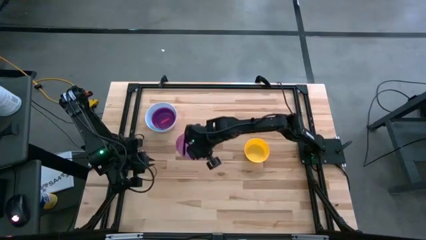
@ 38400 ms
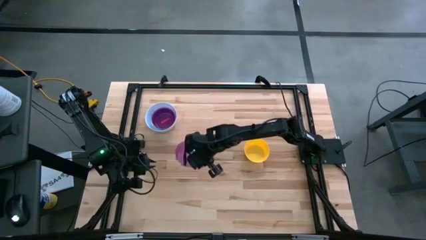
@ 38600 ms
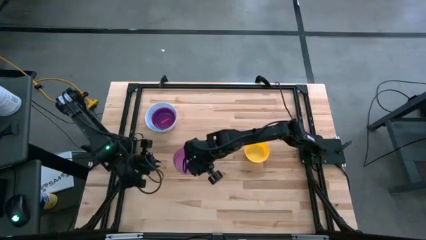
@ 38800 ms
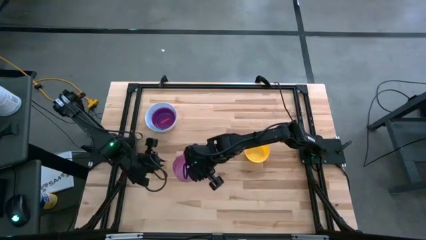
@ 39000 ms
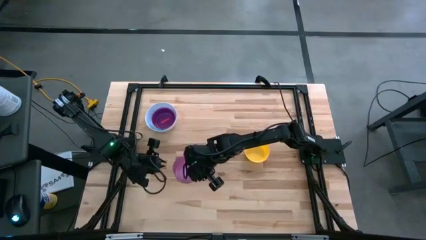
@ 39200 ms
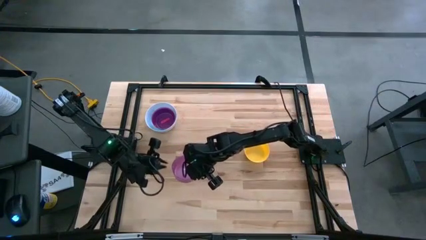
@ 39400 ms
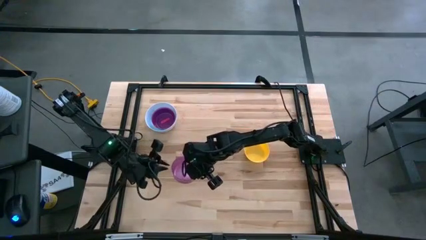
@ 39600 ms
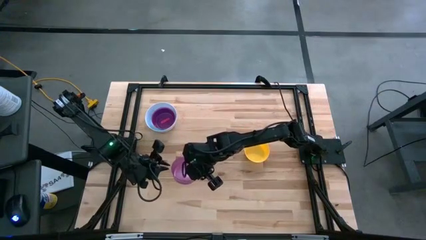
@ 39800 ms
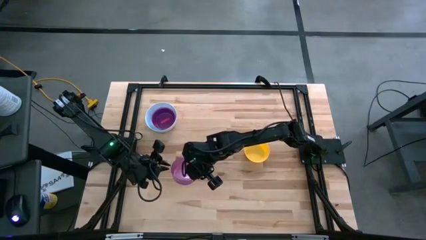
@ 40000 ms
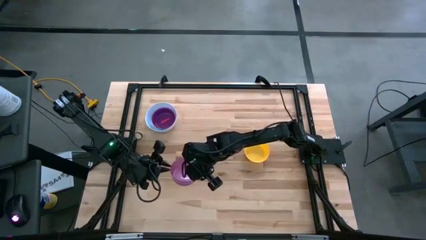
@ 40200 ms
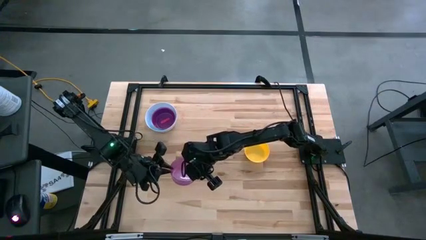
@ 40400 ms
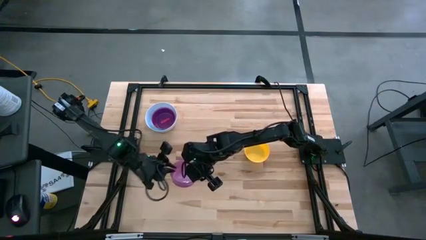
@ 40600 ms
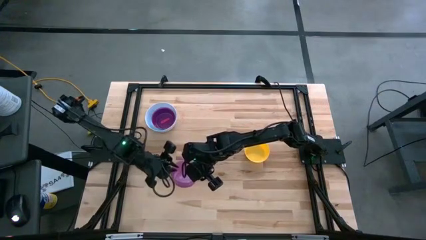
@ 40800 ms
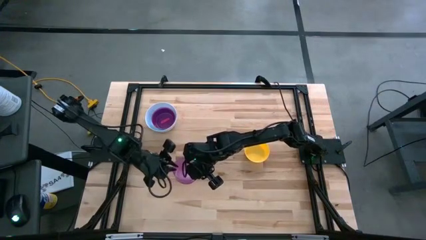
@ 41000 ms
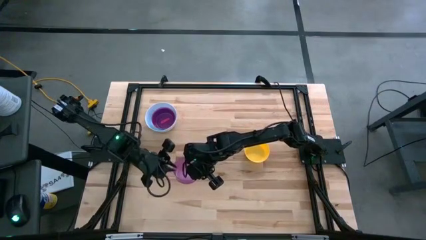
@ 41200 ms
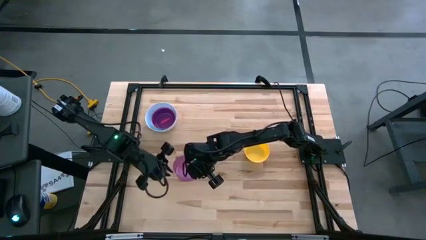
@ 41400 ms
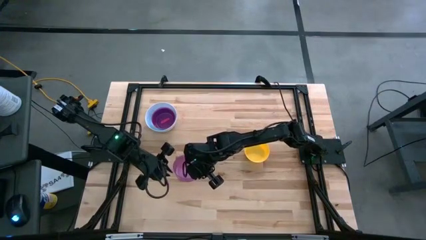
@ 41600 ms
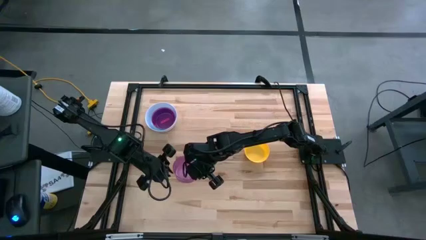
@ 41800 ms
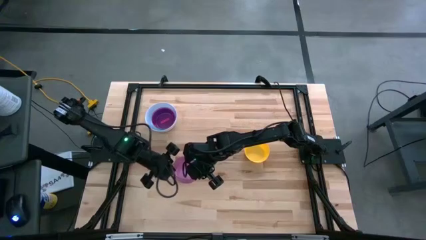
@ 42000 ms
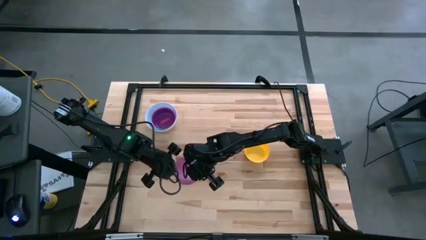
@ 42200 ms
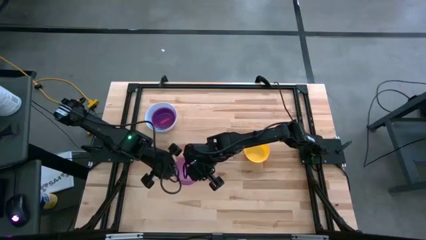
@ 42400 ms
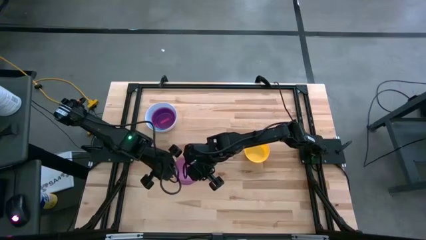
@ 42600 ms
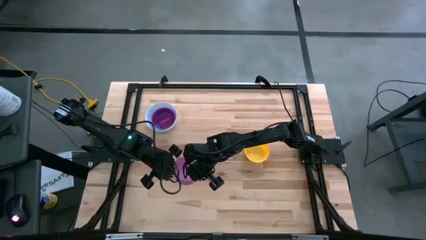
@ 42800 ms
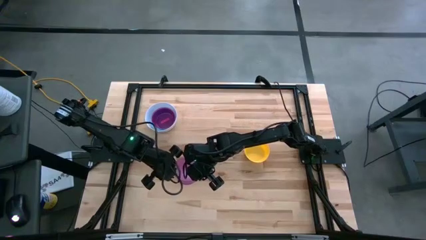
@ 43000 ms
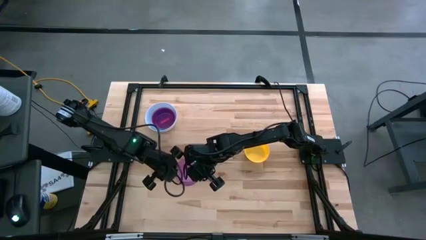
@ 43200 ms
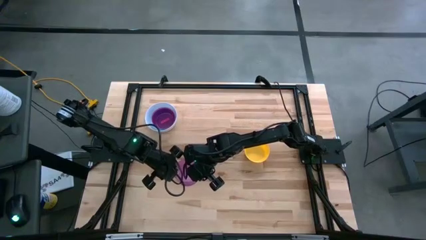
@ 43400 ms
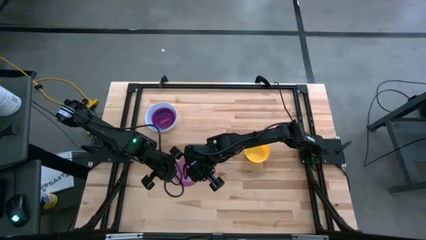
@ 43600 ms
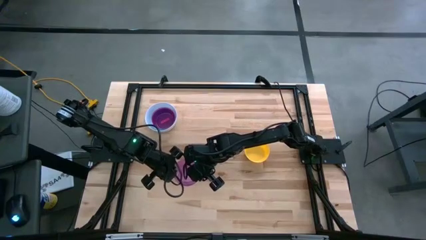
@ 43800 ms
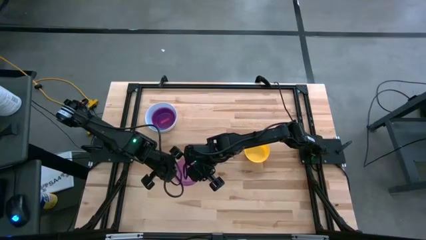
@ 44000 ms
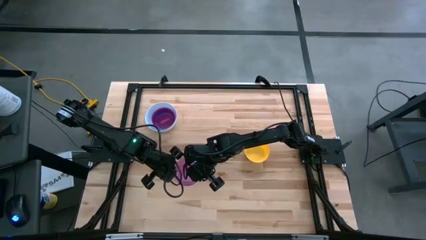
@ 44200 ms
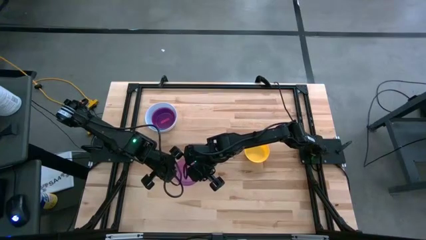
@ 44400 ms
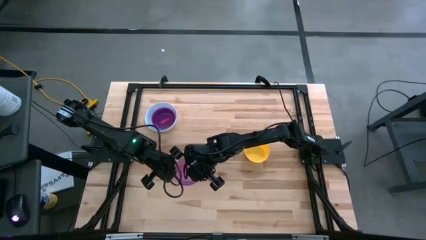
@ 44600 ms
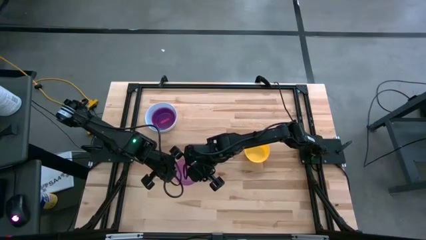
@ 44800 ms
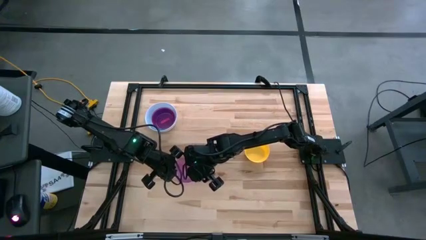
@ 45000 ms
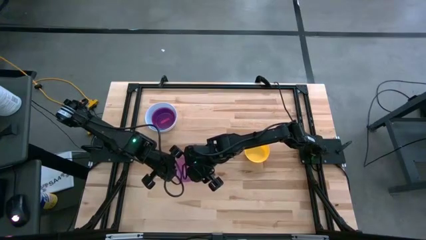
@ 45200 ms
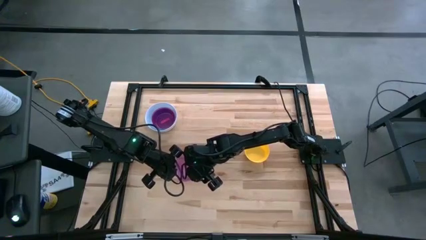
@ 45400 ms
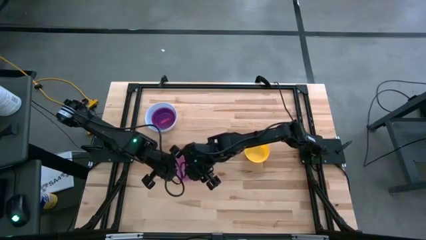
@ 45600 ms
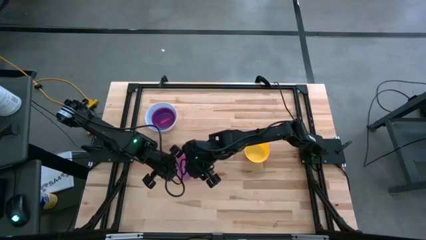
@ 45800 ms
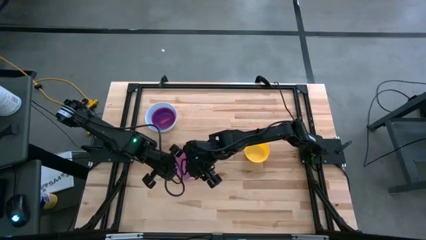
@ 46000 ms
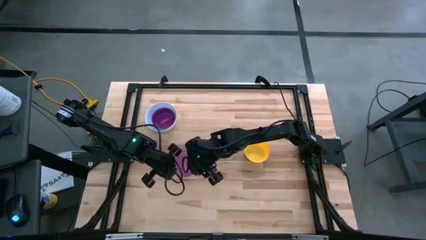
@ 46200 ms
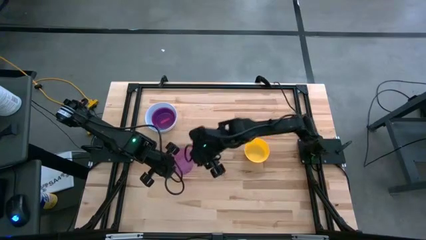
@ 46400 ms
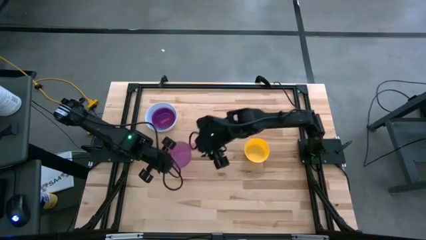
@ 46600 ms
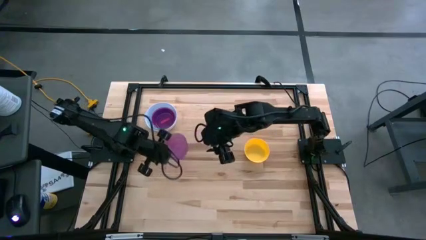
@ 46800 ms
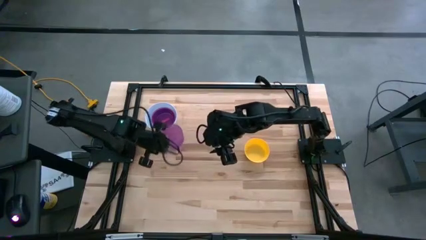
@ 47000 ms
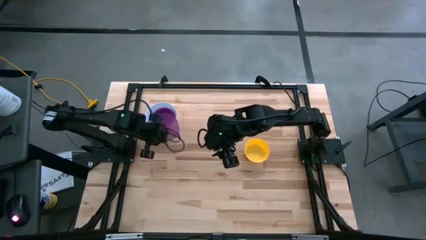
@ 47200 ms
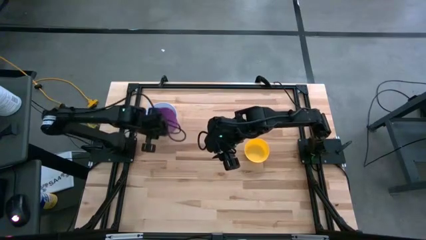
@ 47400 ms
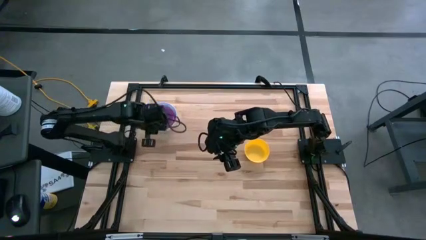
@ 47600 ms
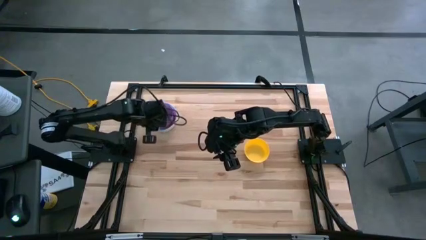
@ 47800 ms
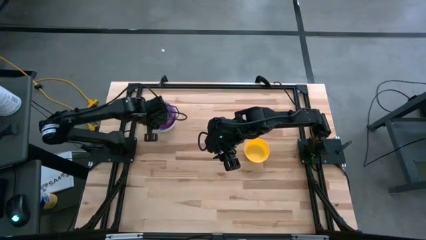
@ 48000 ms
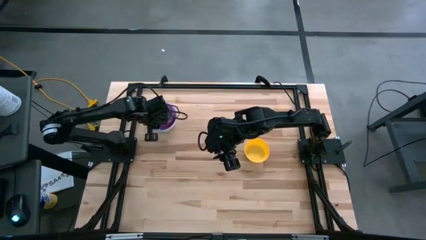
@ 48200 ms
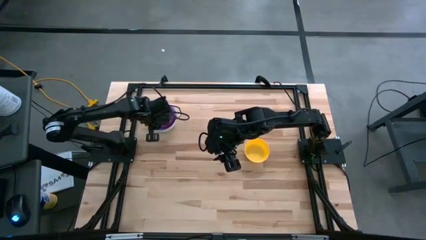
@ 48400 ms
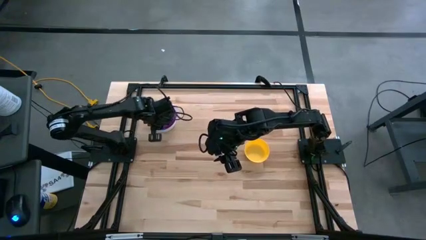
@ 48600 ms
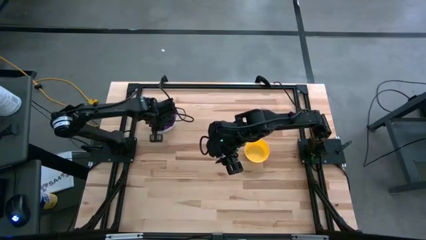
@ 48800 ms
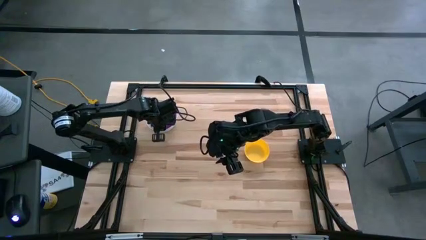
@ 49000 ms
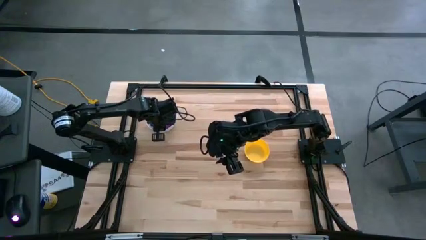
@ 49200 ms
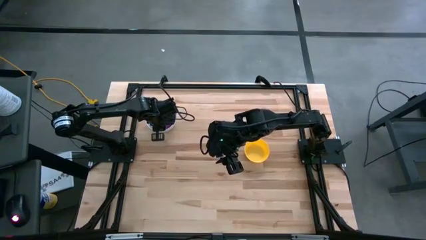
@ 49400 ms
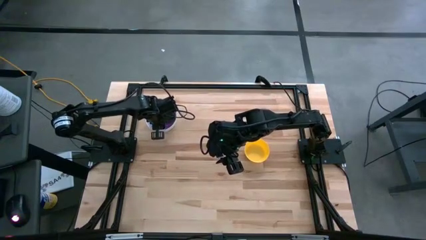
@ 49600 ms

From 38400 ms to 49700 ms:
Stack the violet bowl on top of the red bowl
